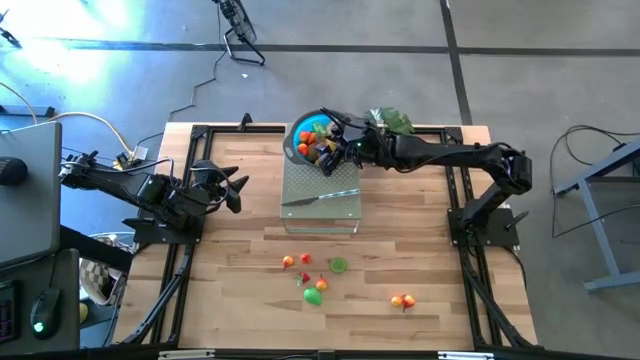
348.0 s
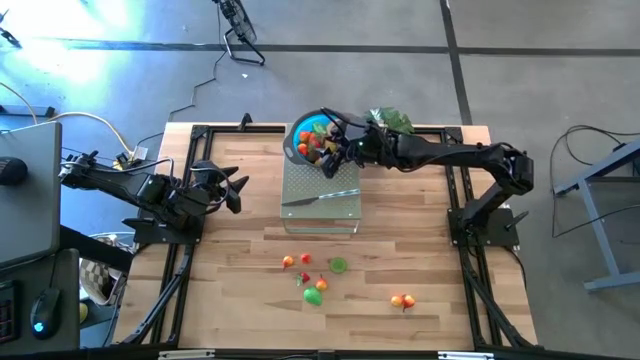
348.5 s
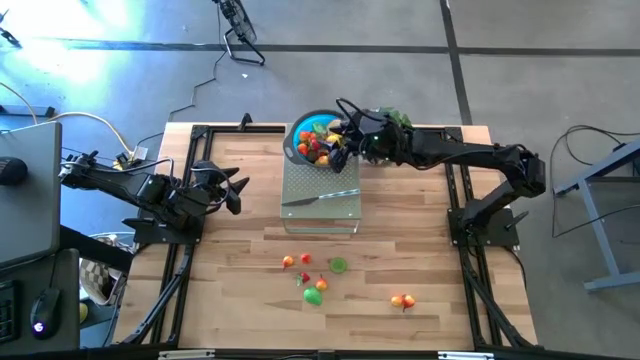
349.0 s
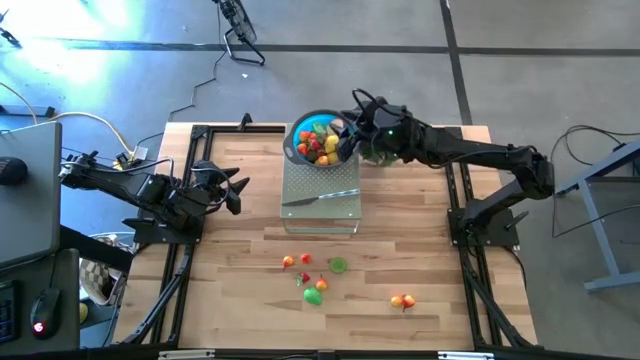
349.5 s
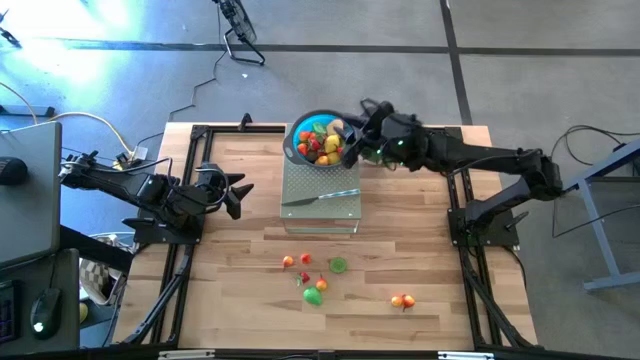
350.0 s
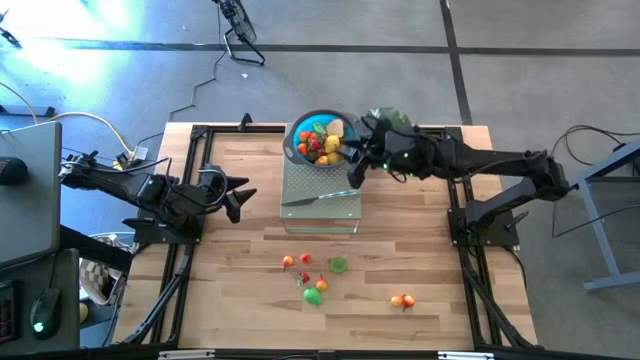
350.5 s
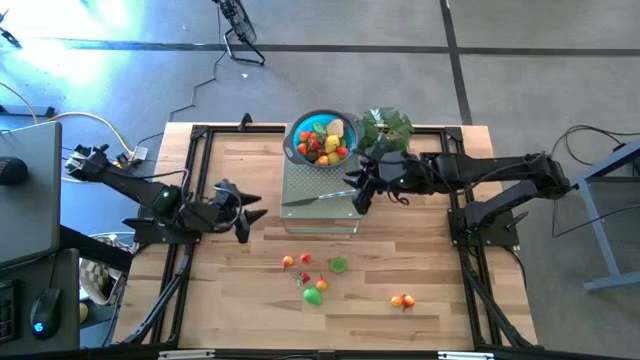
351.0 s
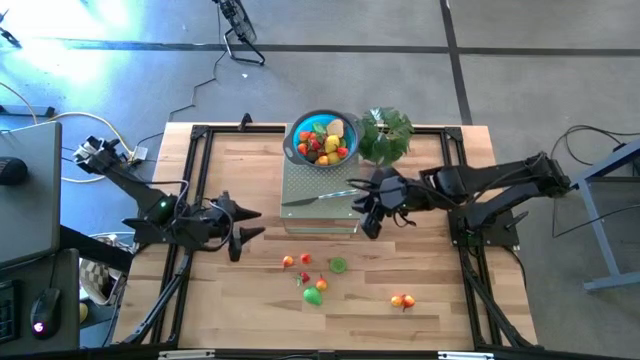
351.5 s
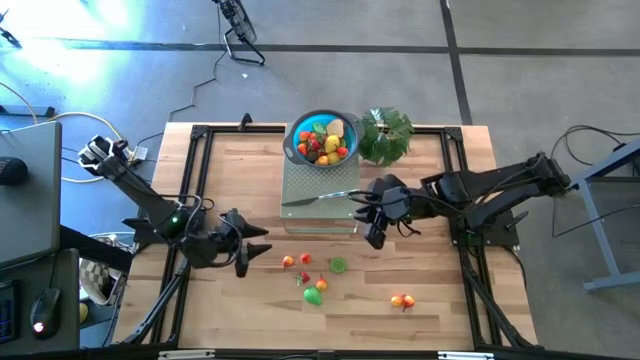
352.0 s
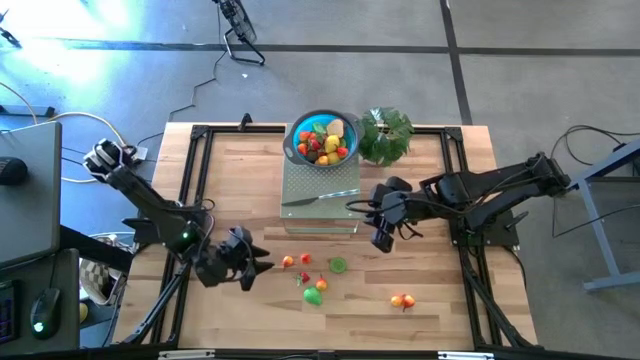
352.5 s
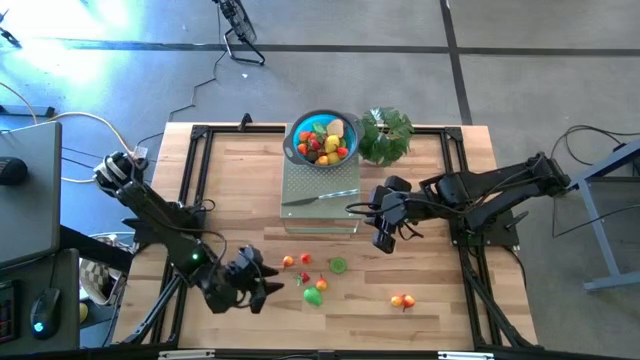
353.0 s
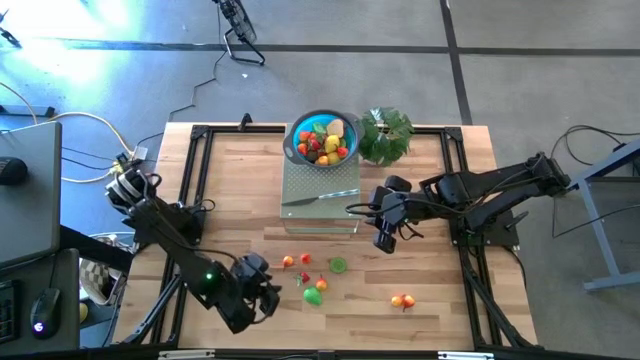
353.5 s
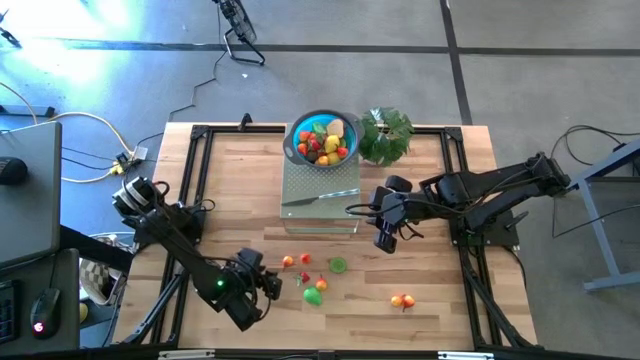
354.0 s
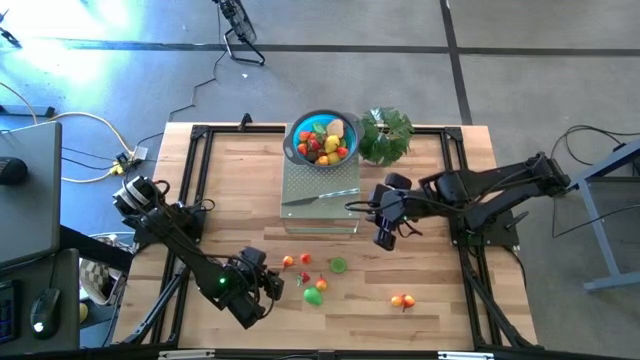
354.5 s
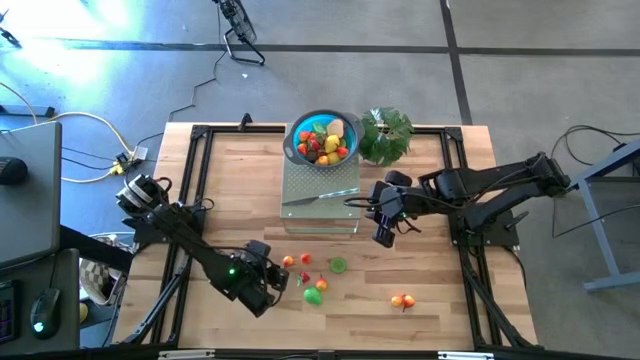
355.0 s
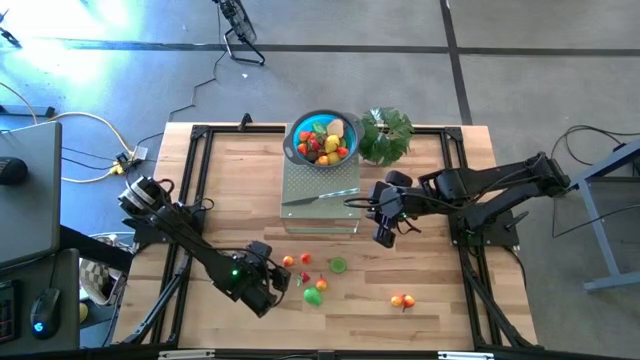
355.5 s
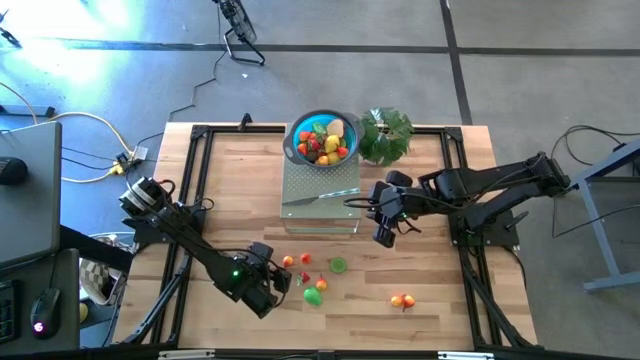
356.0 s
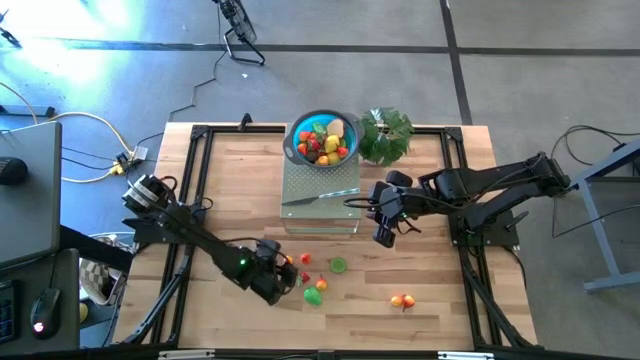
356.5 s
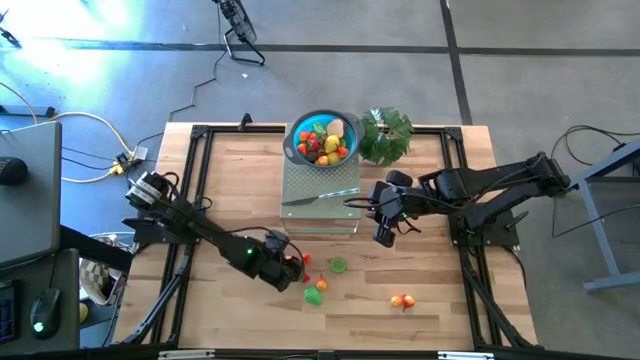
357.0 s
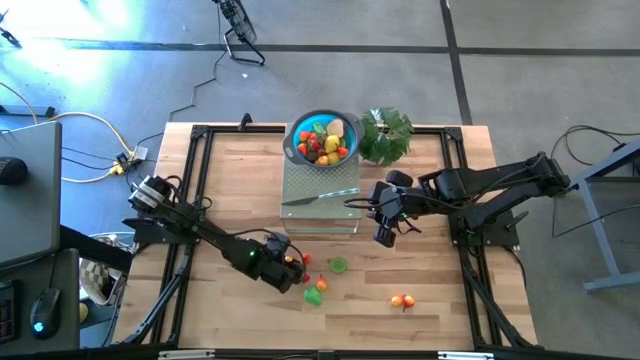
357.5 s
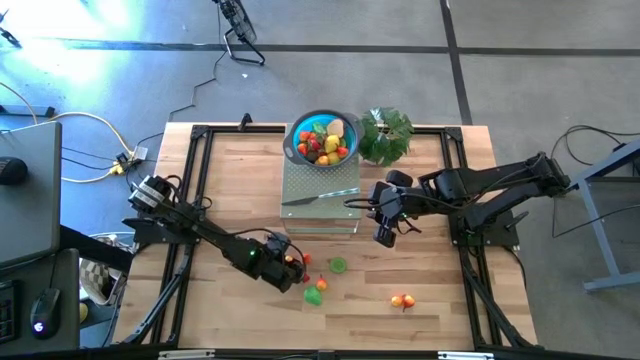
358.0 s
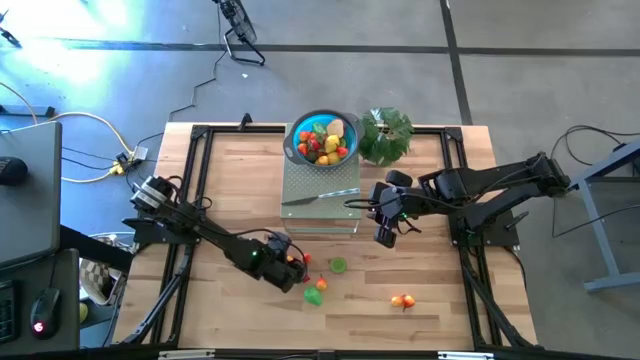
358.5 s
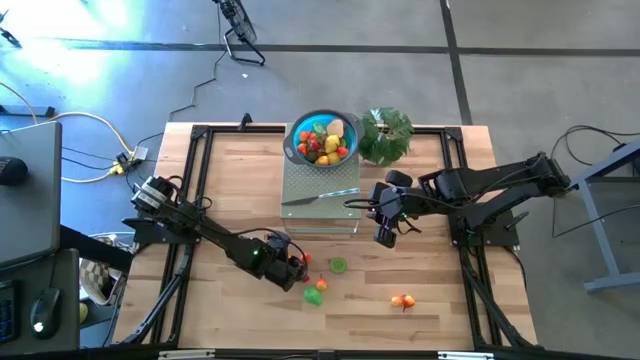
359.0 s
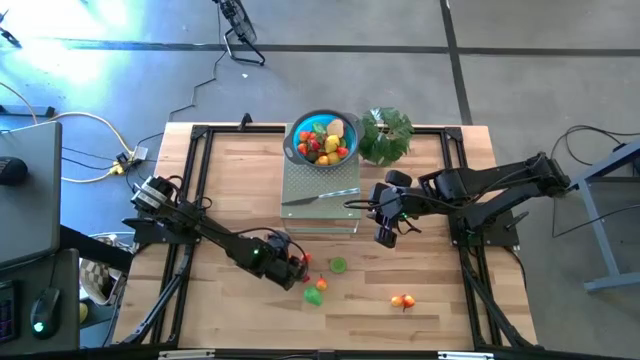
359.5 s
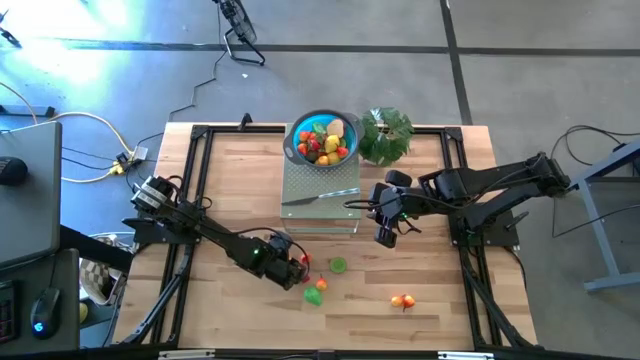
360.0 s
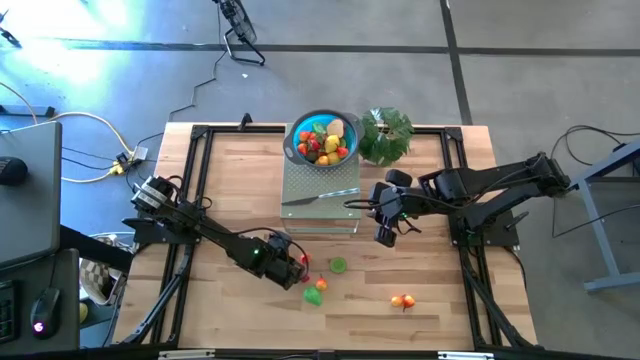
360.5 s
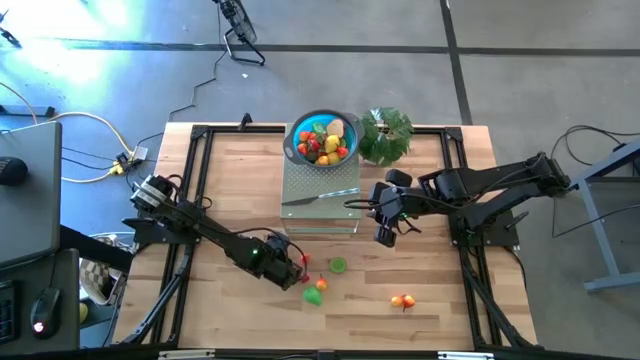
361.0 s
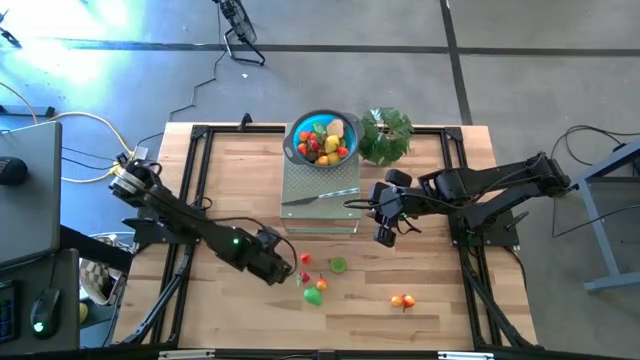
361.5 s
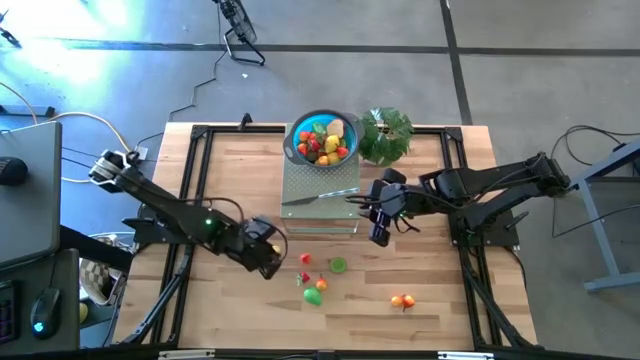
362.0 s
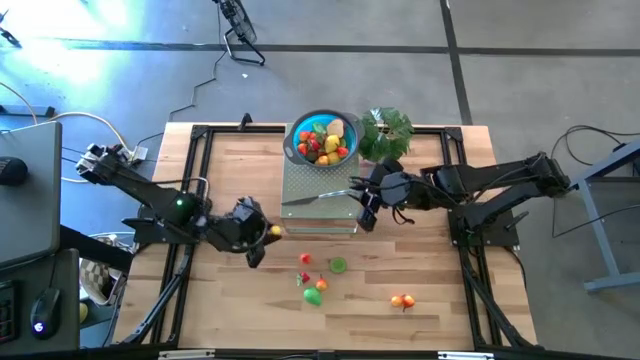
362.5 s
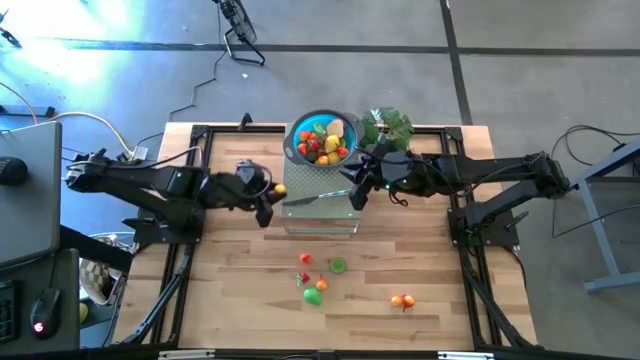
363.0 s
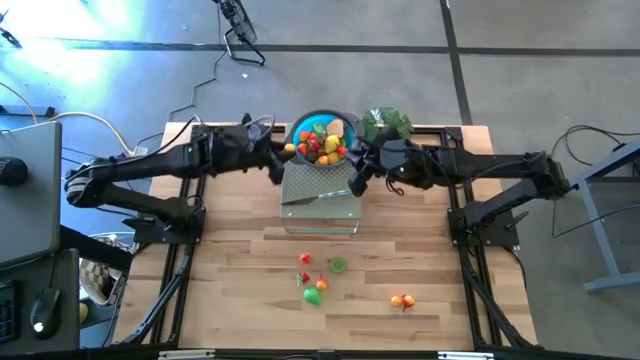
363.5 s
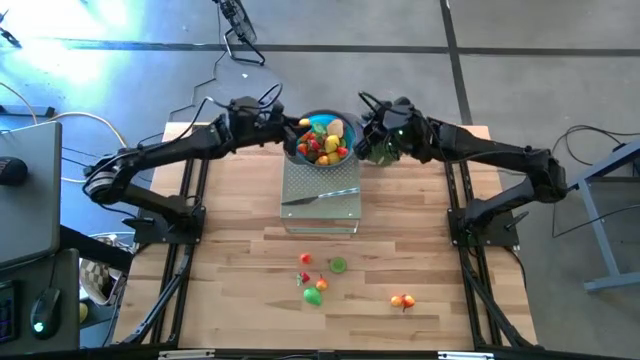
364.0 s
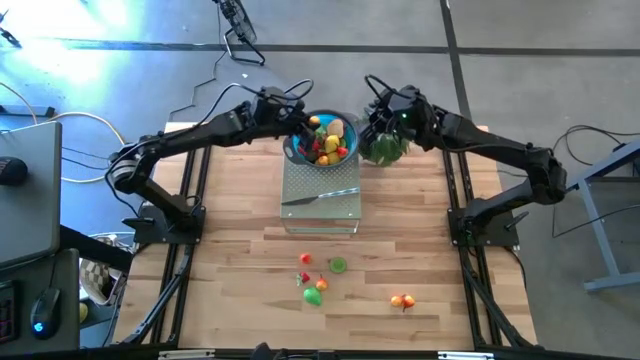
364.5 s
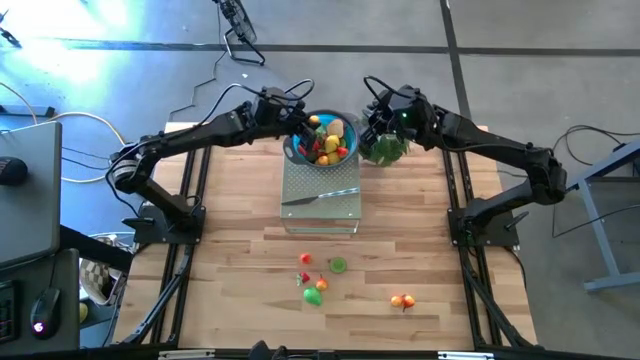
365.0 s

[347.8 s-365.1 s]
Task: Pick & Place Fruit
Put the orange peach in the blue bowl on the shelf

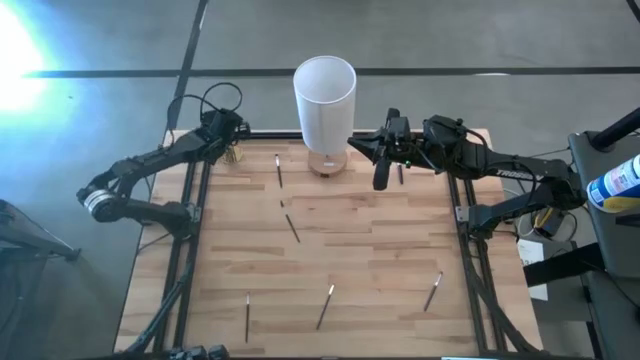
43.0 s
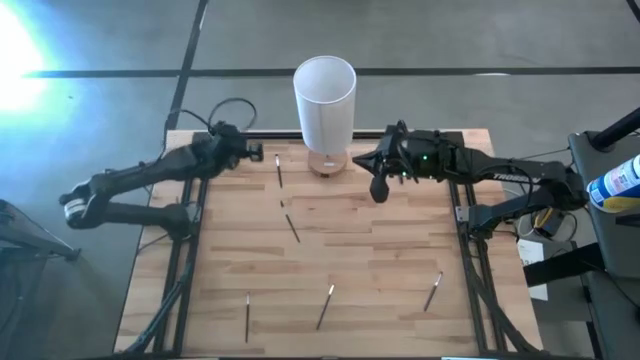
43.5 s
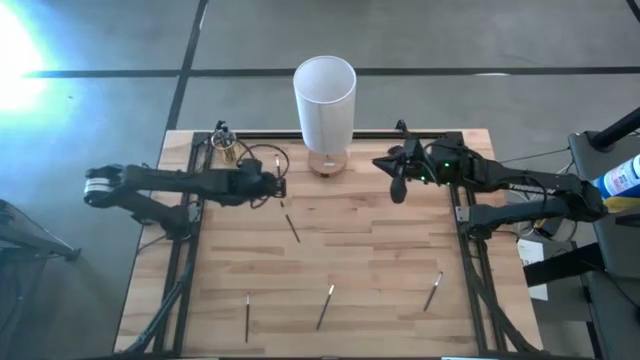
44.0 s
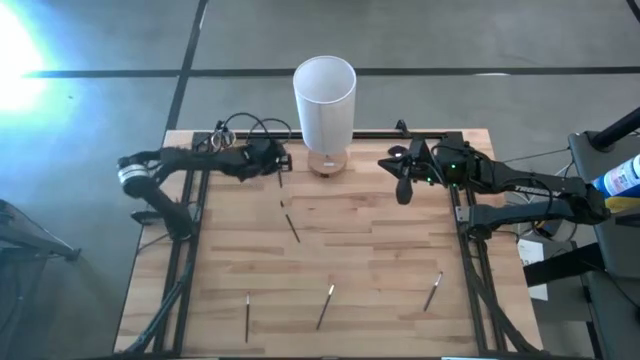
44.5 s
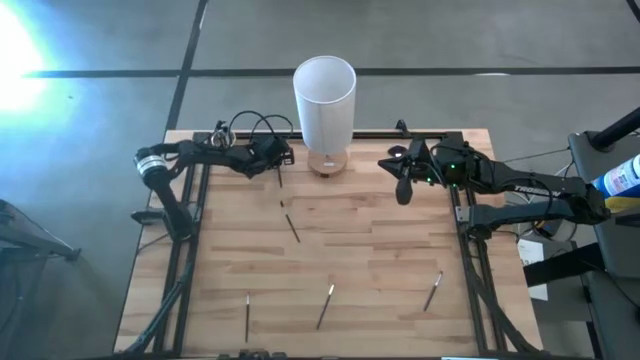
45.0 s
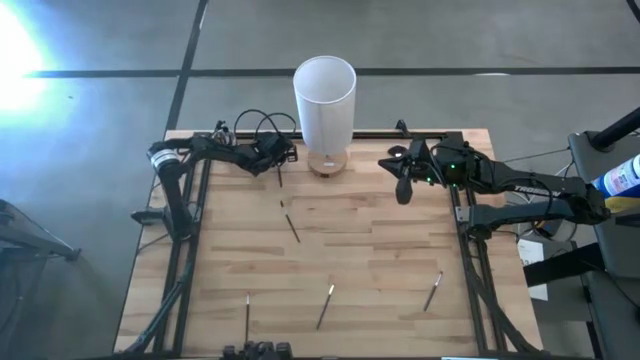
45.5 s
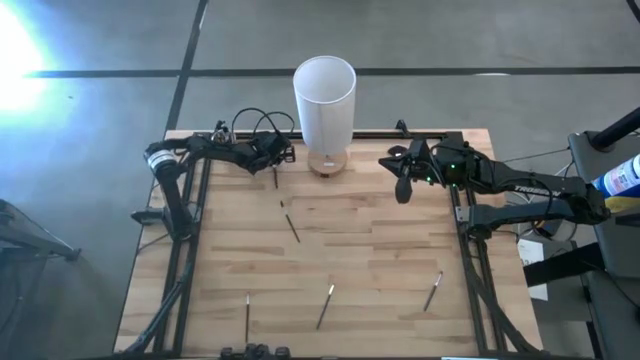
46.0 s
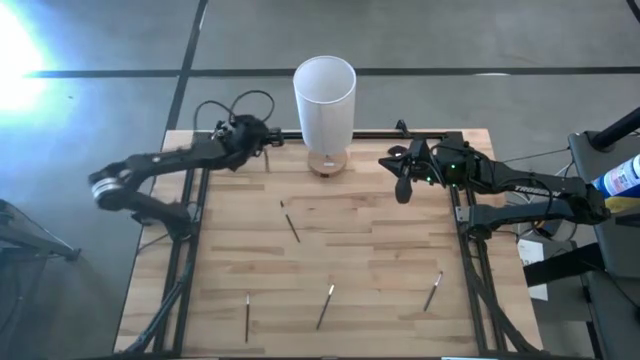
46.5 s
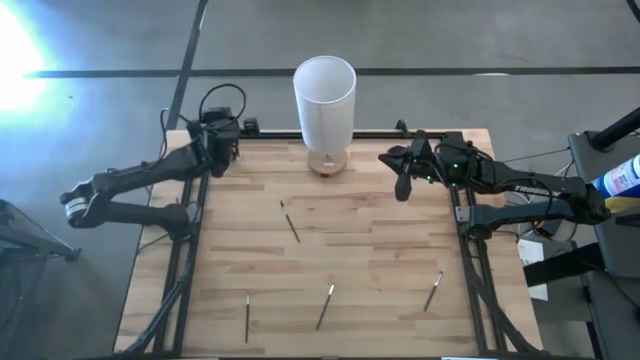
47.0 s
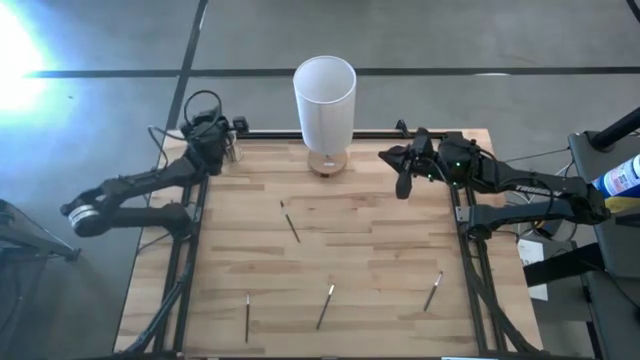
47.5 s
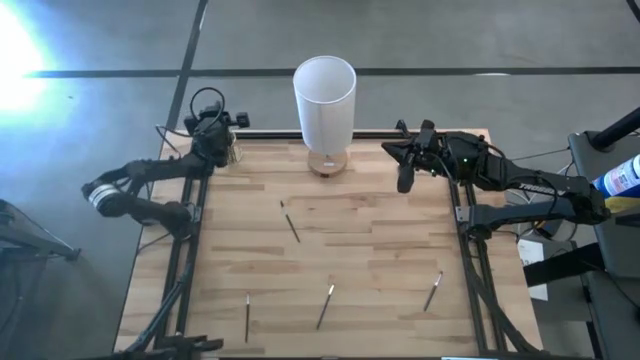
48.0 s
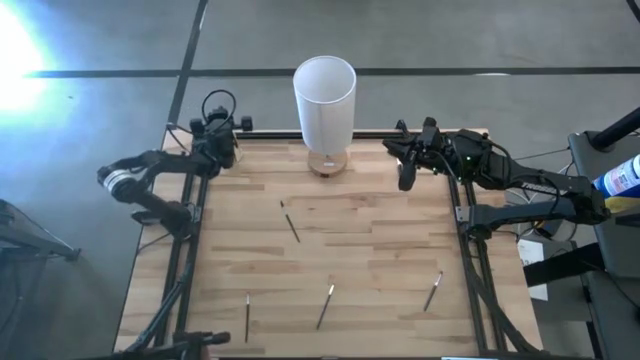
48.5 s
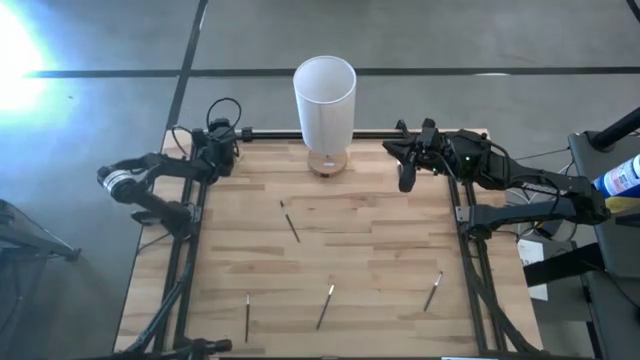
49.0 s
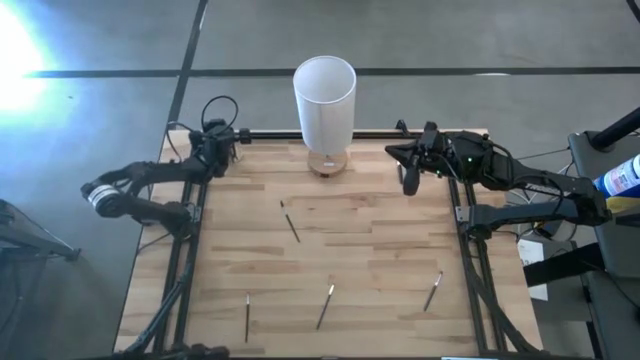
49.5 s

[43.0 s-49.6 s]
Task: Pick & Place Makeup Brushes
Put the eyeshadow brush into the makeup holder
